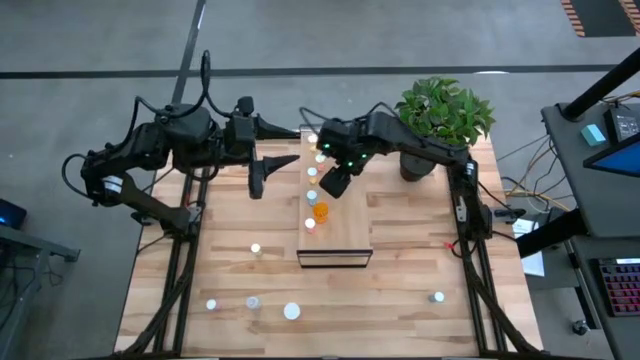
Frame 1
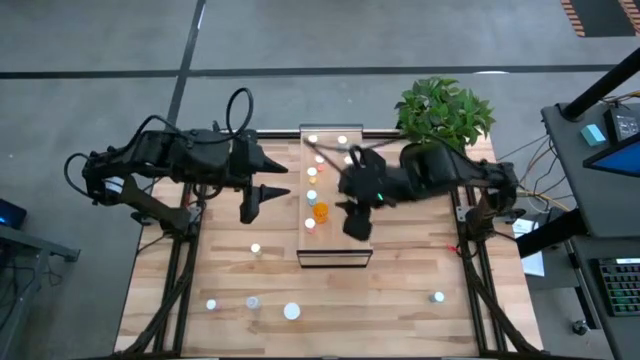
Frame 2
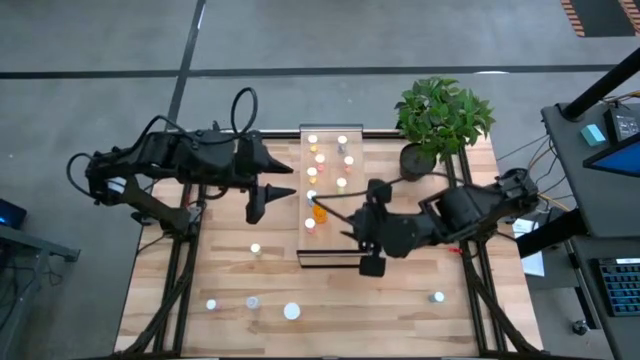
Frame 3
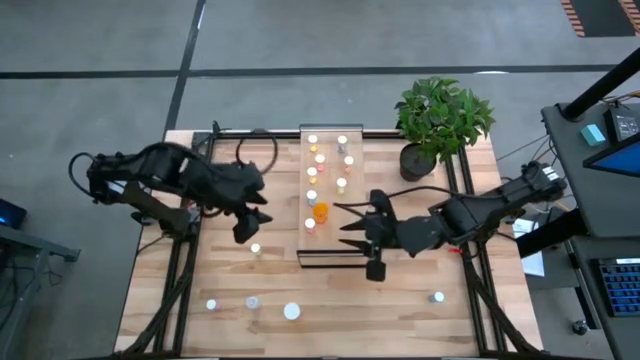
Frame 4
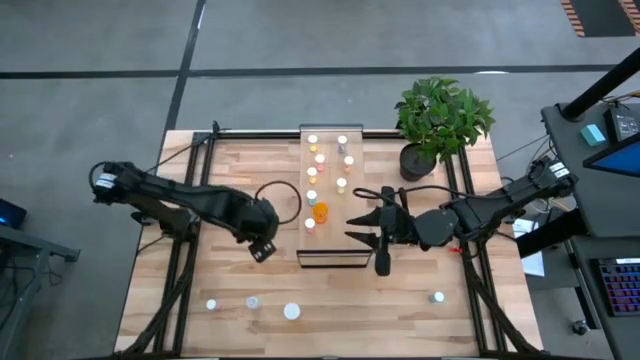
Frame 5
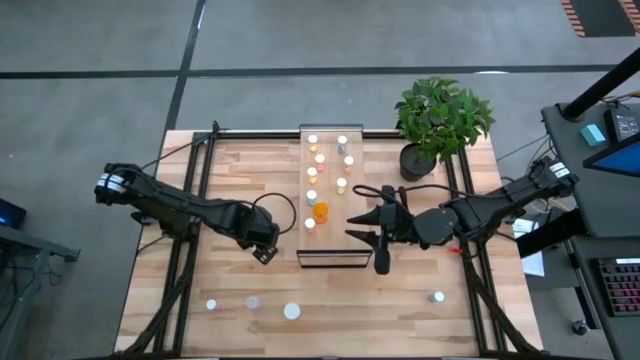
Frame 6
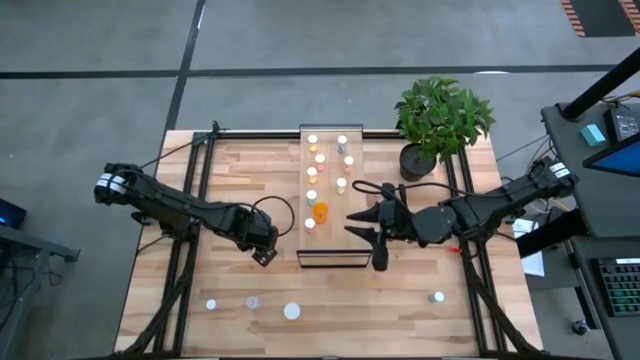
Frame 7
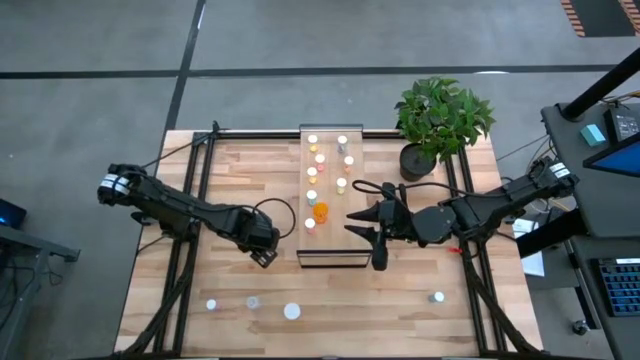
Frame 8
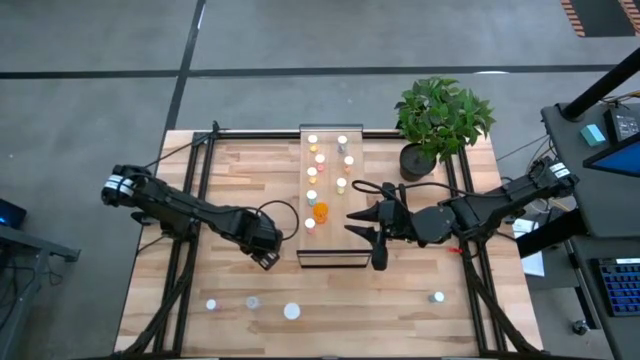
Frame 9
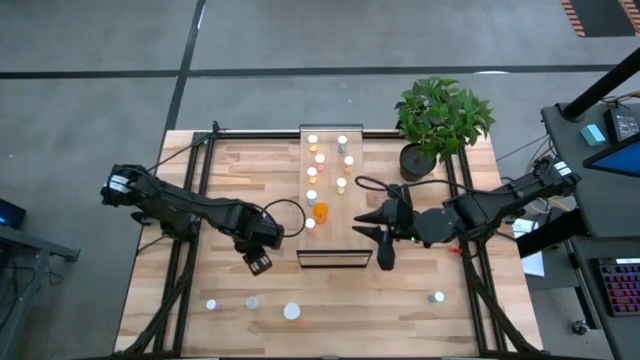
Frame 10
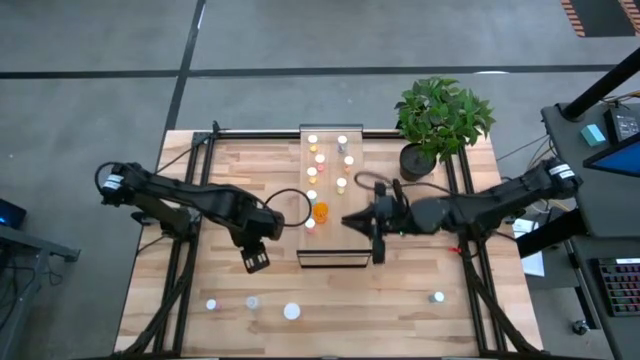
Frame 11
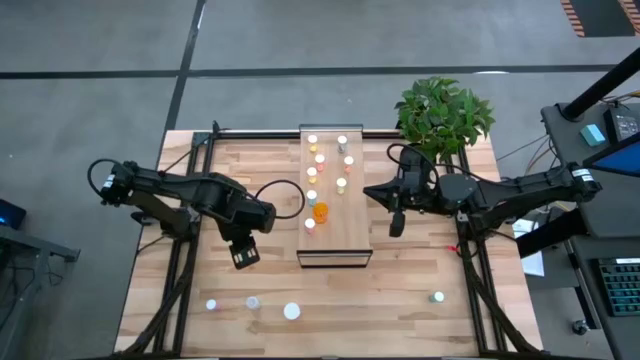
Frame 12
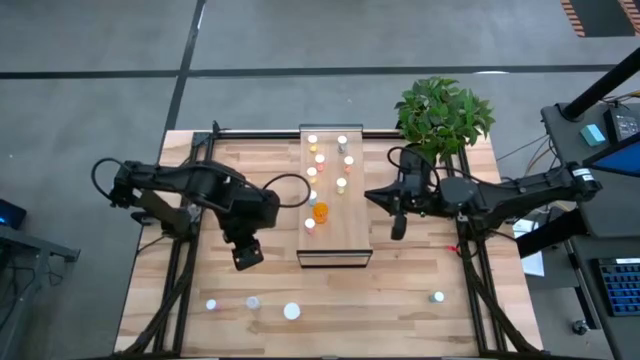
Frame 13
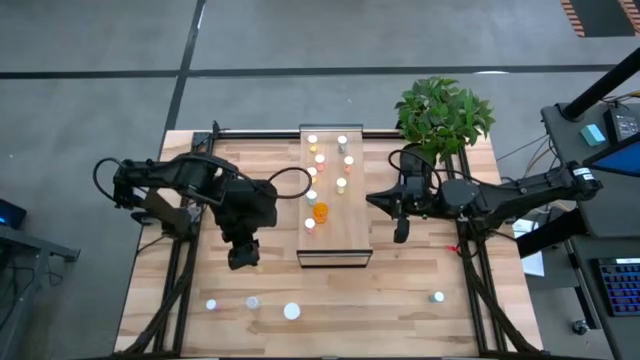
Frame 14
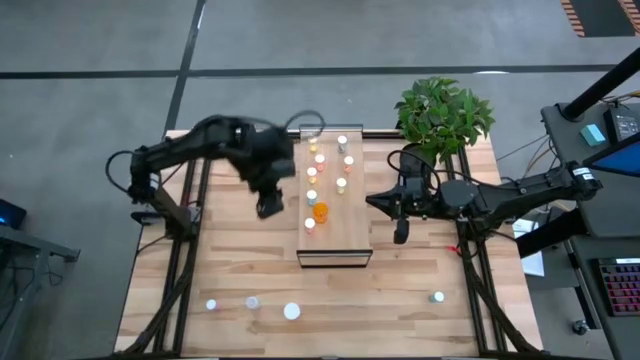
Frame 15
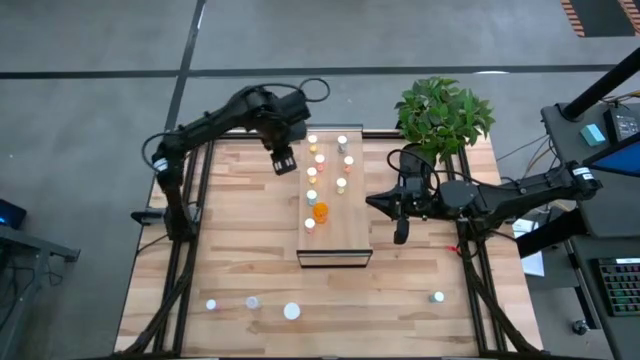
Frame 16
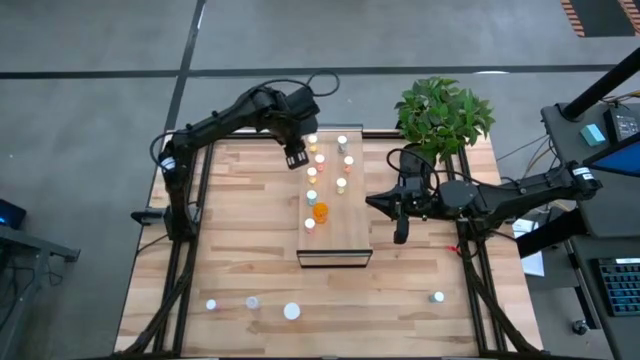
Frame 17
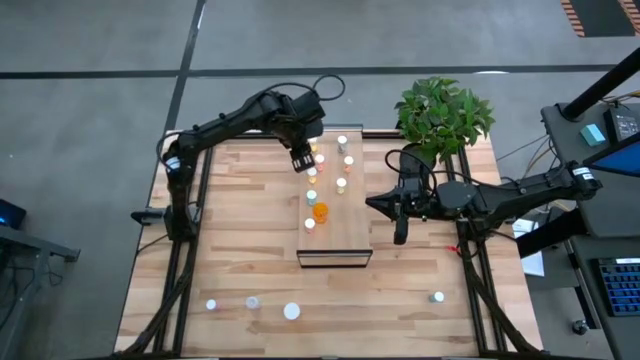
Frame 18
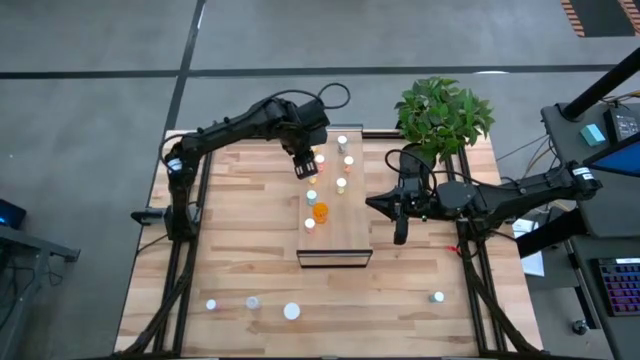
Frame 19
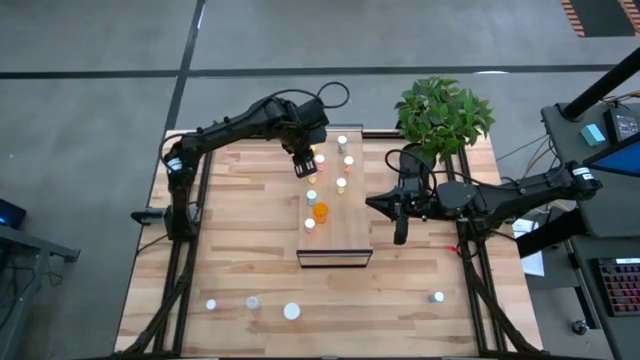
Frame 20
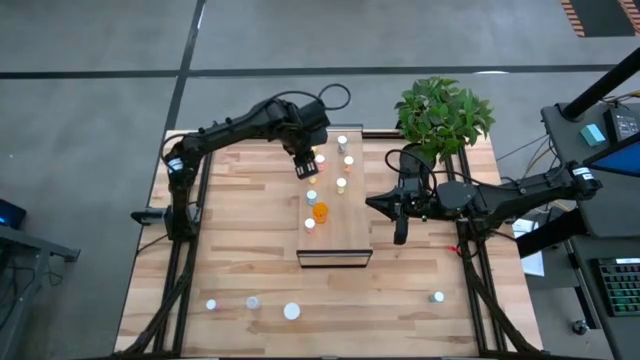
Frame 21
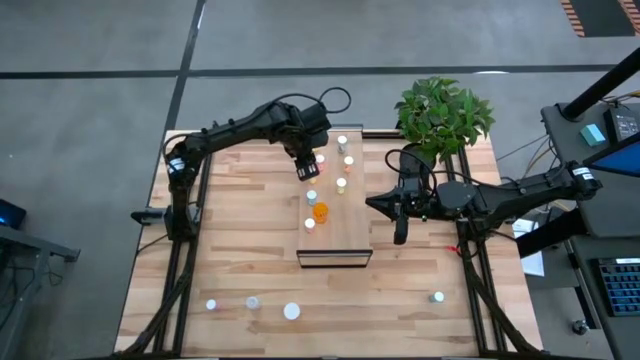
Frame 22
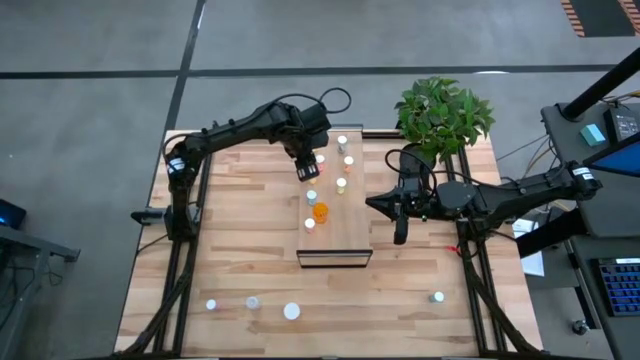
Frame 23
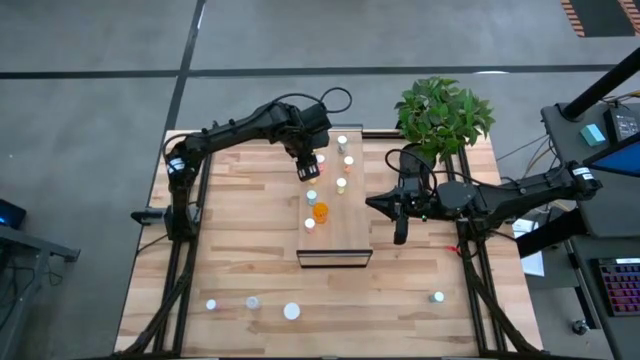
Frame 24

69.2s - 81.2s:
Task: Pick and place medicine bottles onto shelf by color
Put the yellow bottle on the shelf

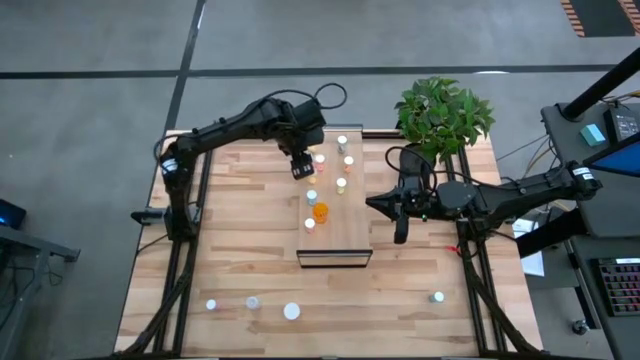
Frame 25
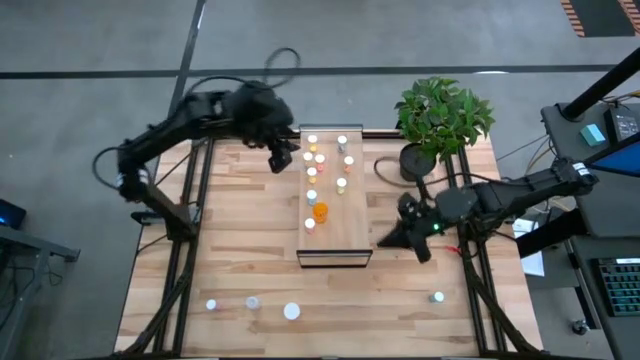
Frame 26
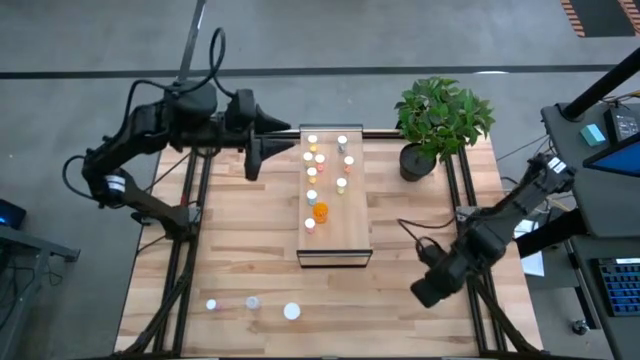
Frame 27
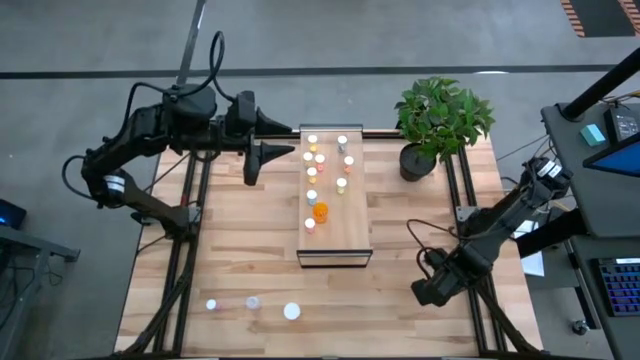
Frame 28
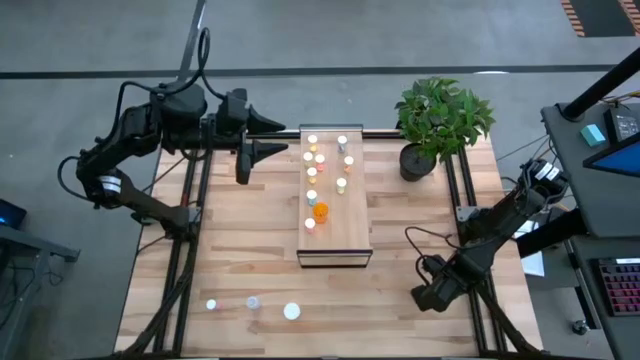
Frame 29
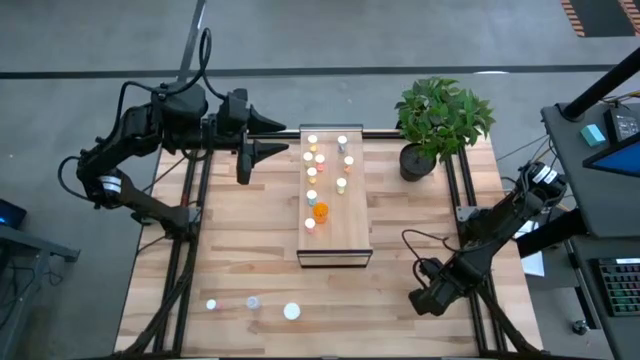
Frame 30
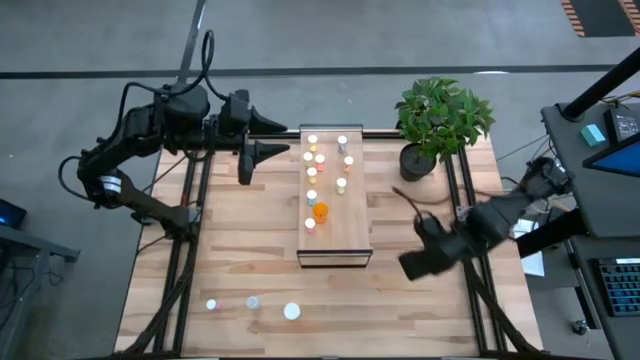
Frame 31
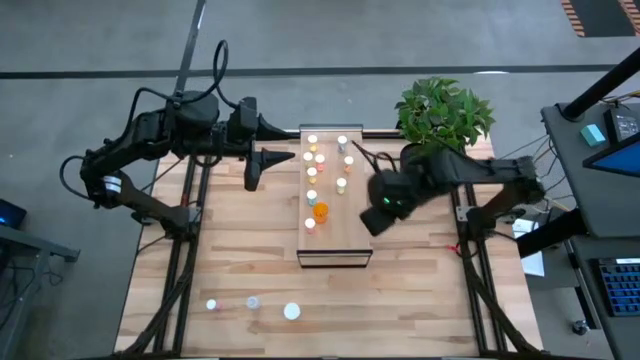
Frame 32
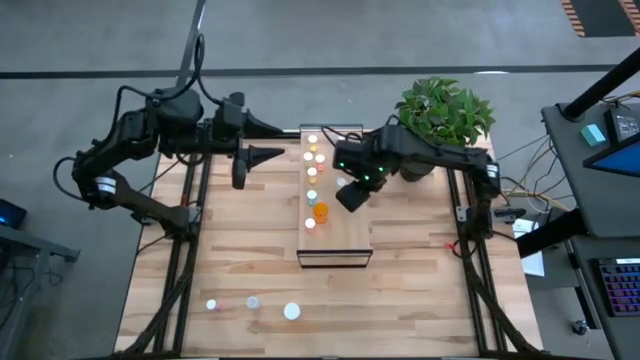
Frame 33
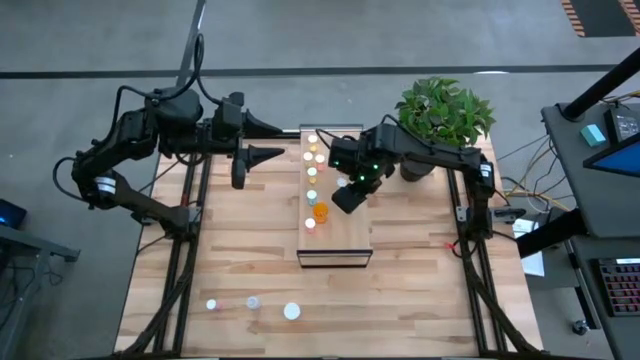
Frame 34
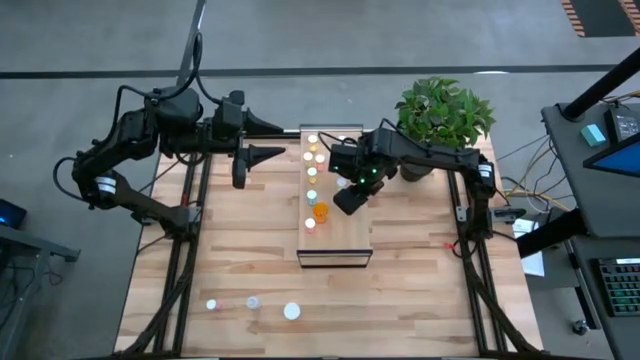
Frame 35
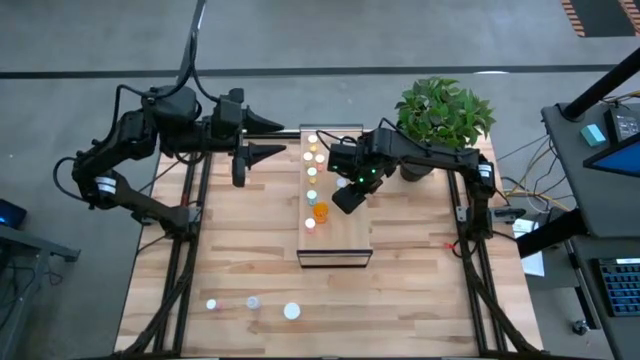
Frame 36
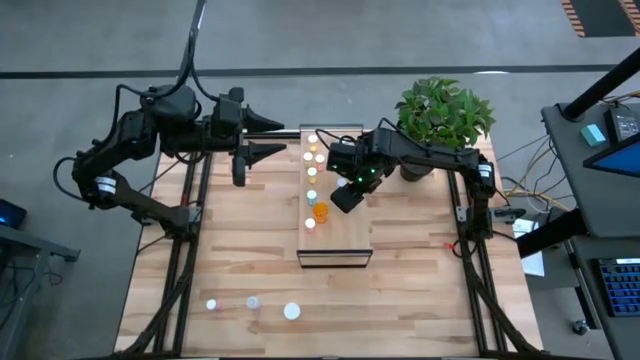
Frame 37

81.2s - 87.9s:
Put the blue bottle on the shelf

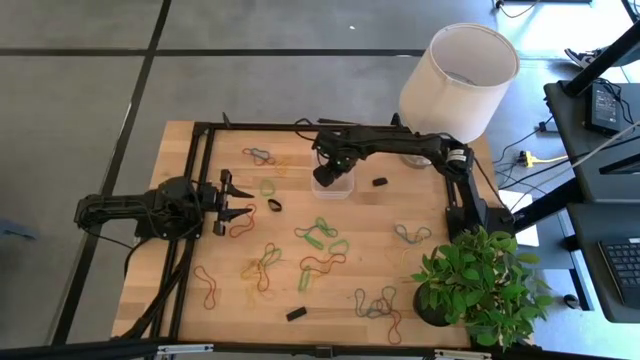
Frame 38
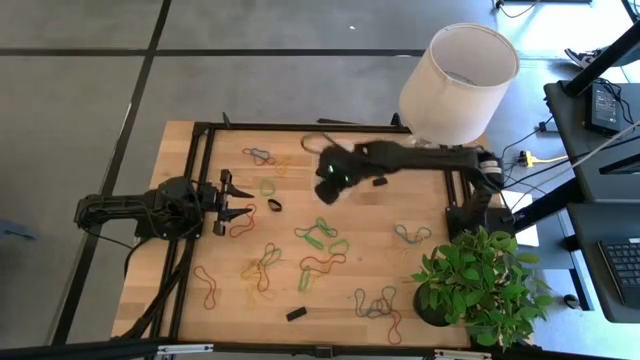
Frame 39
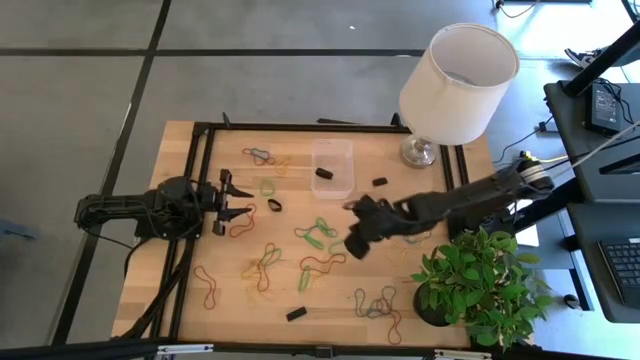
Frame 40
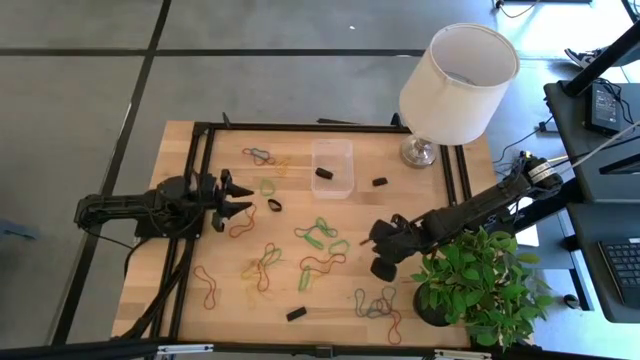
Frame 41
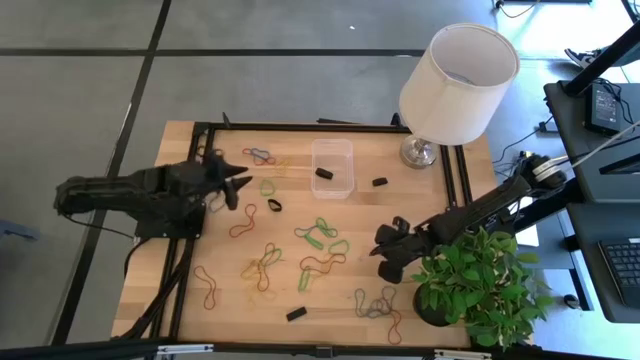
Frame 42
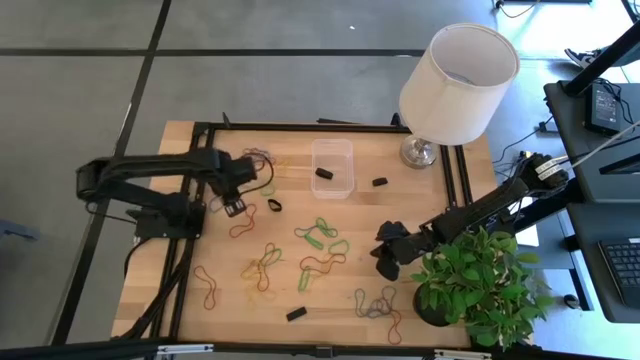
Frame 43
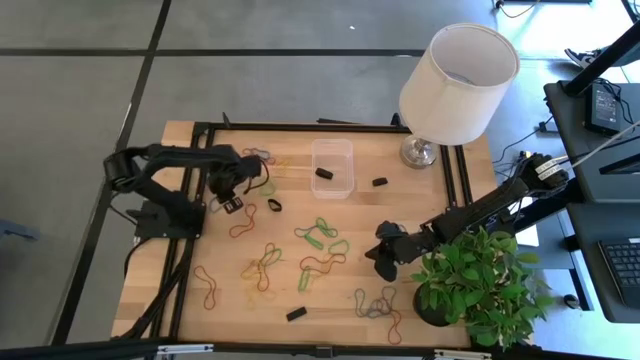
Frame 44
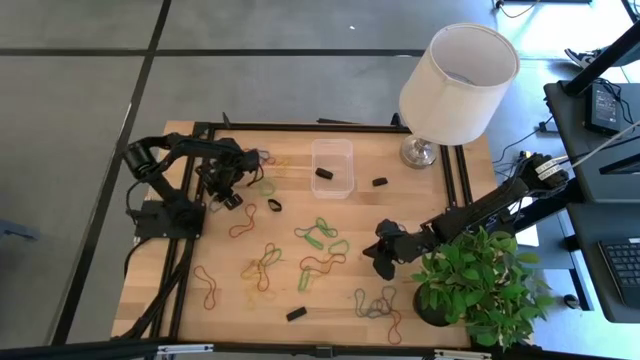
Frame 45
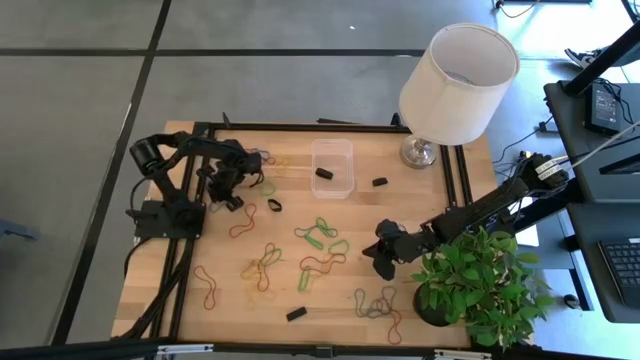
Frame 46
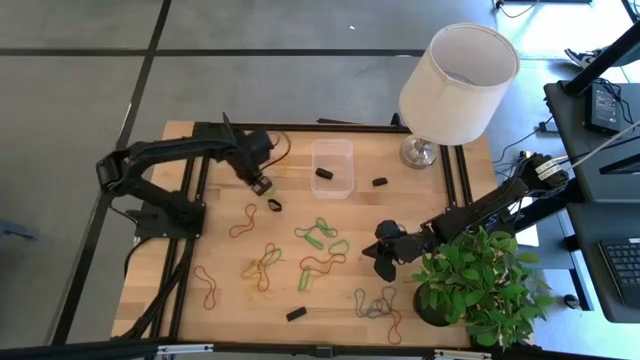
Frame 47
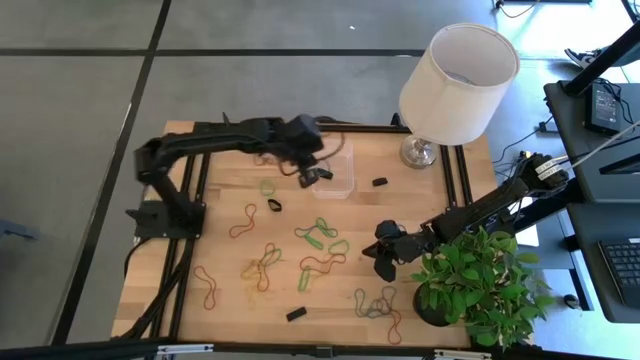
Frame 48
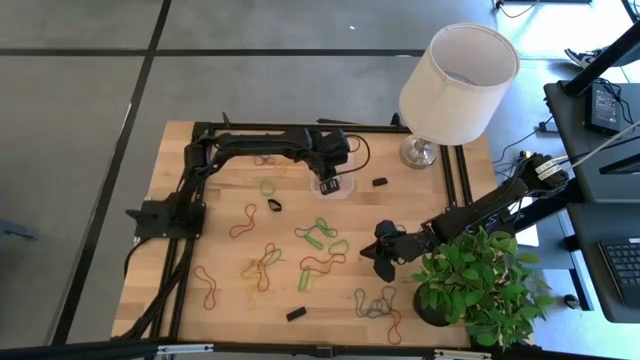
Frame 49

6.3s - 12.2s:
Task: Pick and place rubber bands into bin
Put the blue rubber band into the transparent bin
